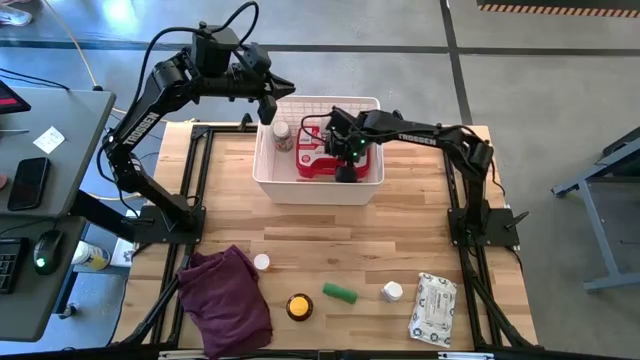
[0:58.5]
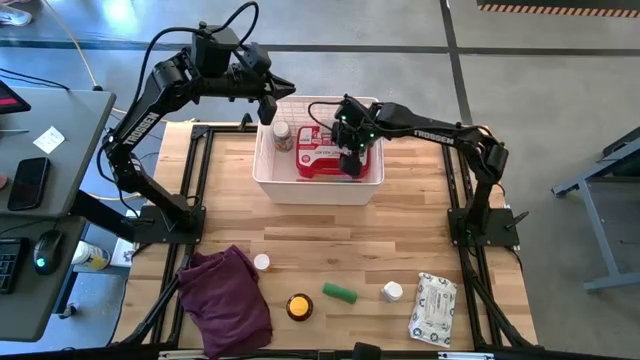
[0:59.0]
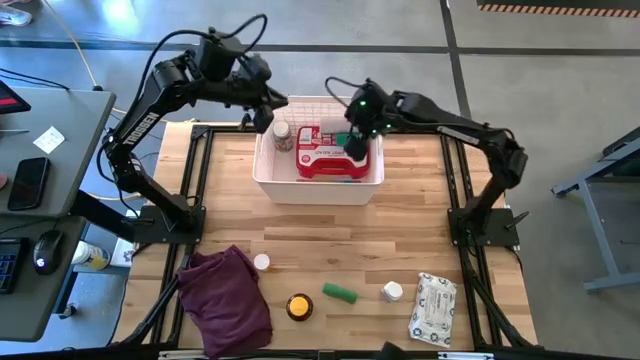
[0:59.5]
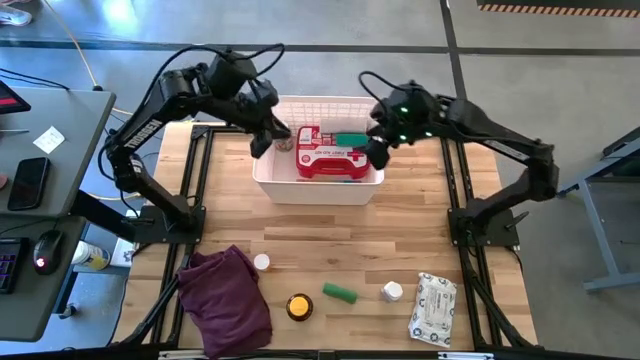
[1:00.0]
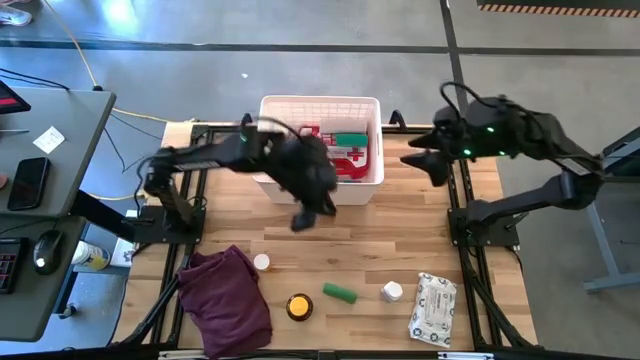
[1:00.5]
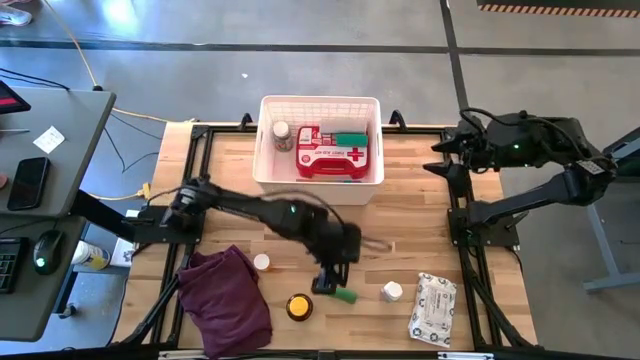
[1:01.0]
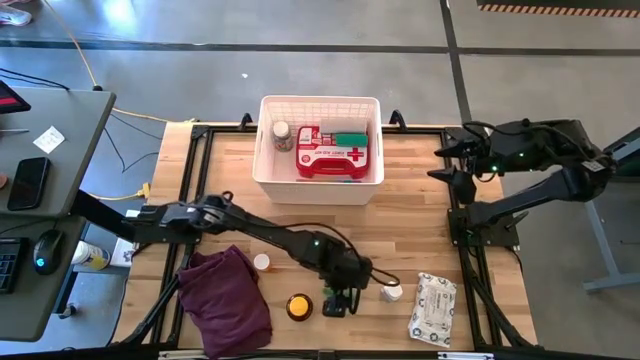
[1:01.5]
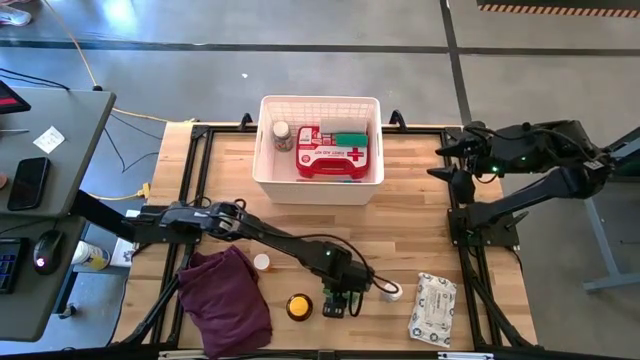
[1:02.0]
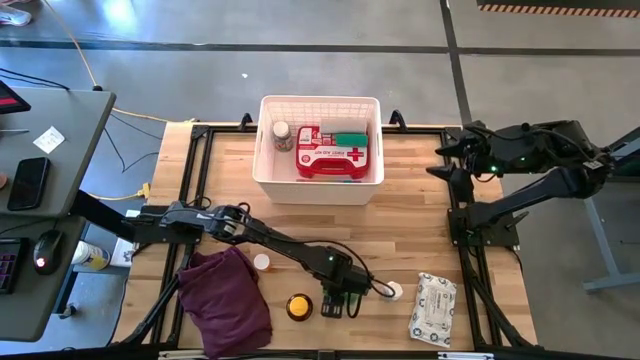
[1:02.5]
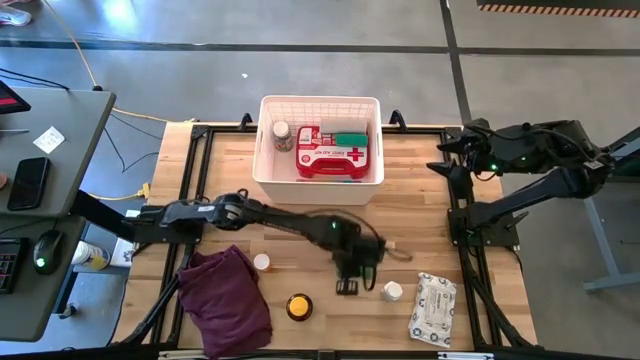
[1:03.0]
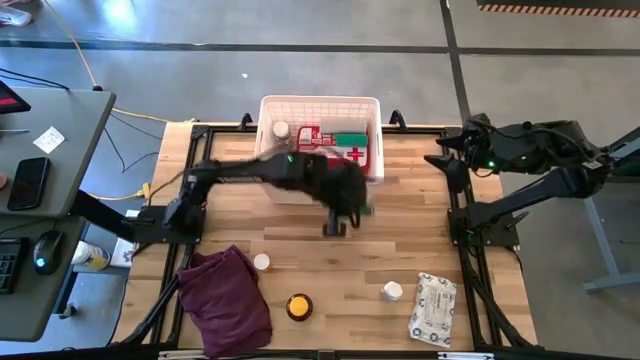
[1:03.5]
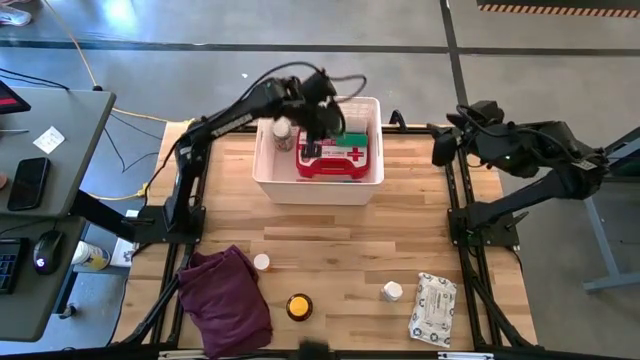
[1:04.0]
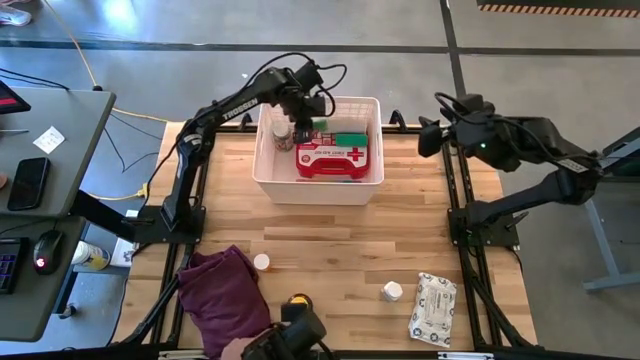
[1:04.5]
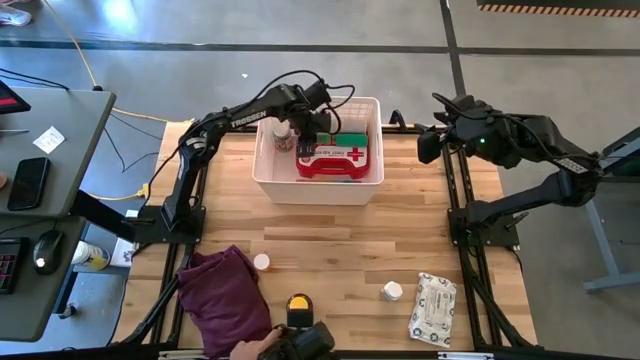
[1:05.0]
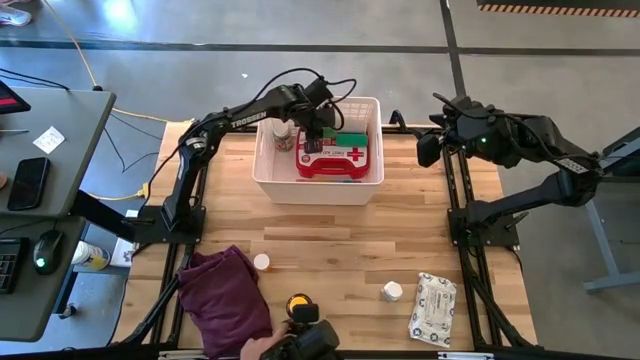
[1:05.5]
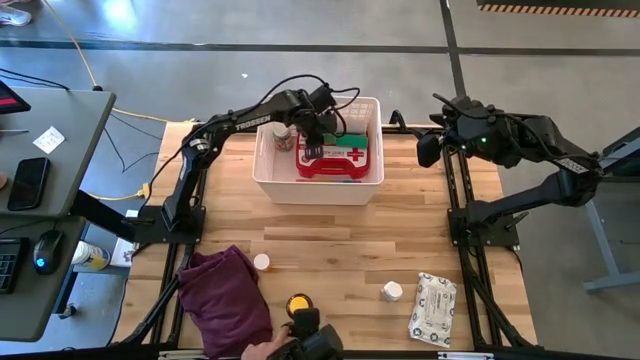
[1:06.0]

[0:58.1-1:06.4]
Task: Pick & place medical supplies in basket/bin
Put the green bandage into the white bin

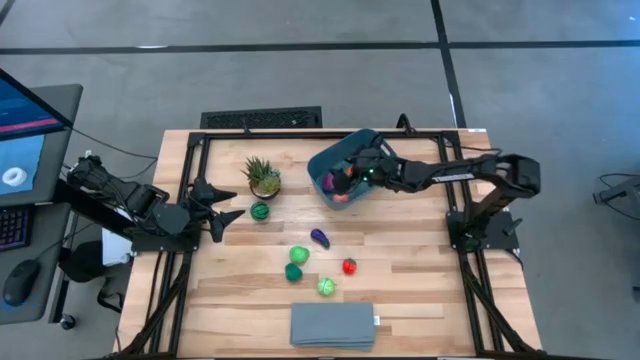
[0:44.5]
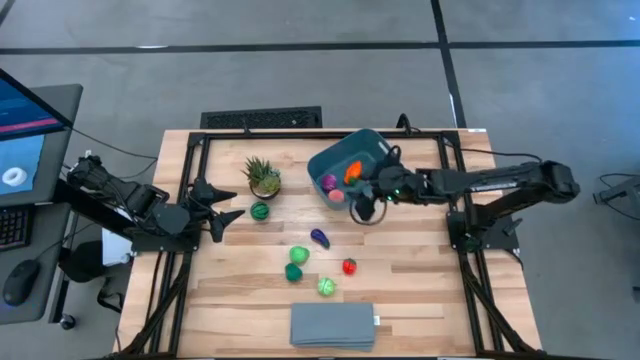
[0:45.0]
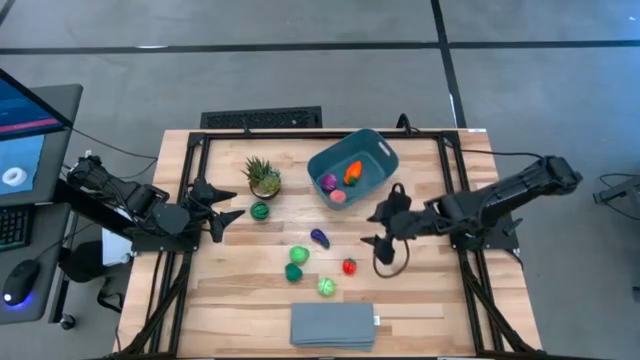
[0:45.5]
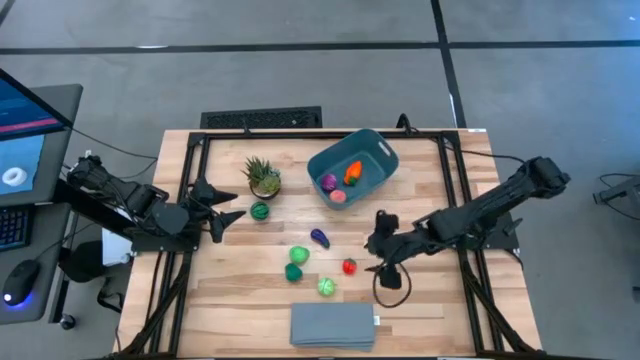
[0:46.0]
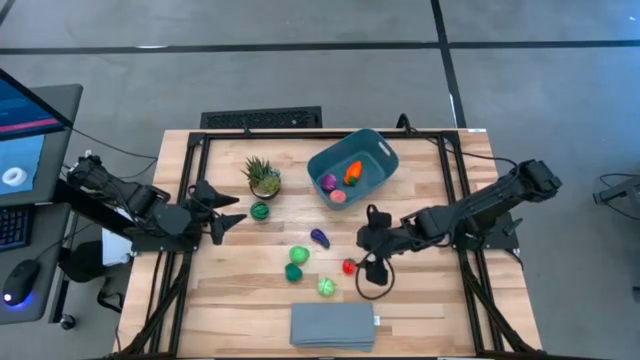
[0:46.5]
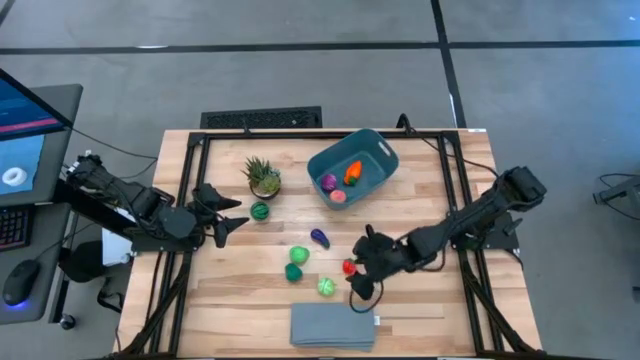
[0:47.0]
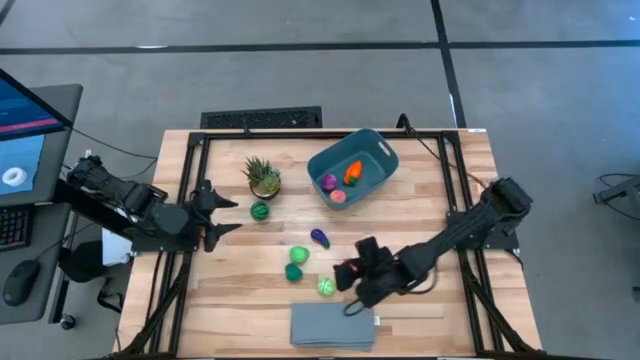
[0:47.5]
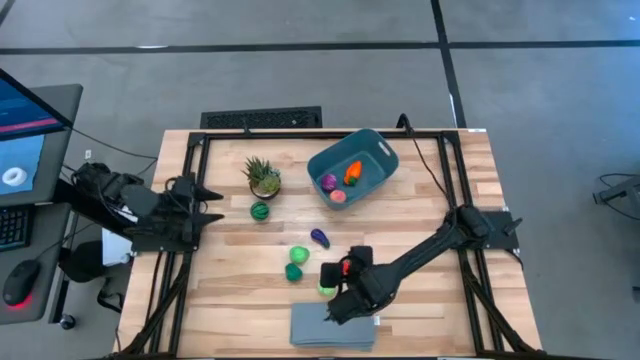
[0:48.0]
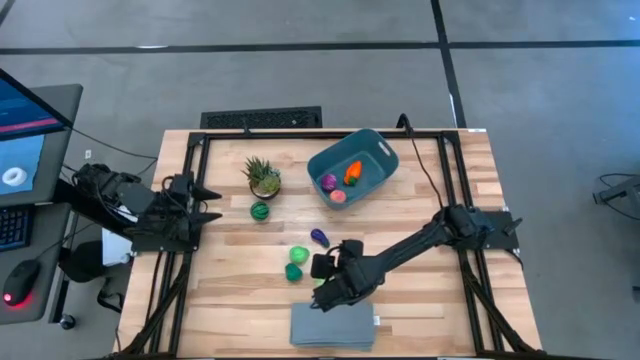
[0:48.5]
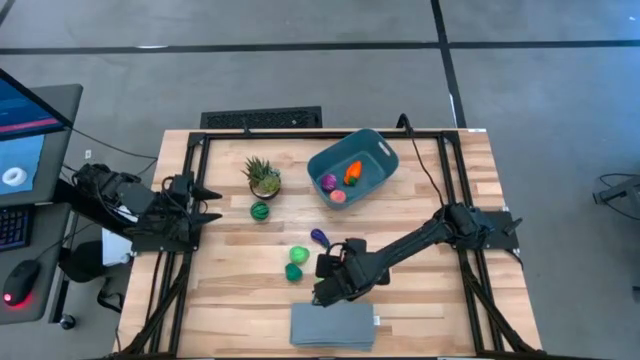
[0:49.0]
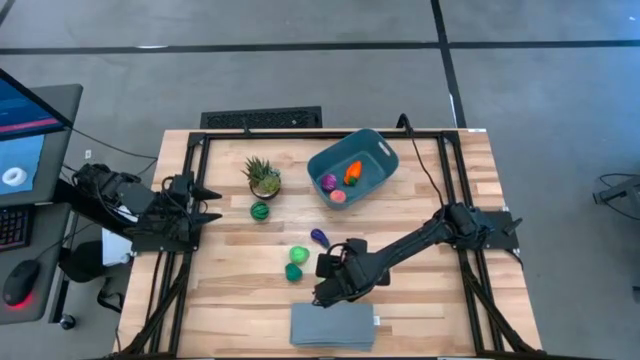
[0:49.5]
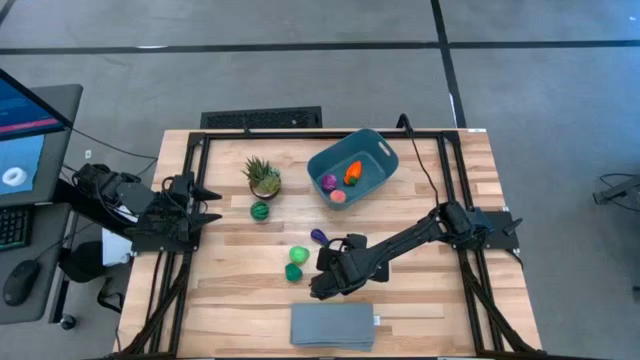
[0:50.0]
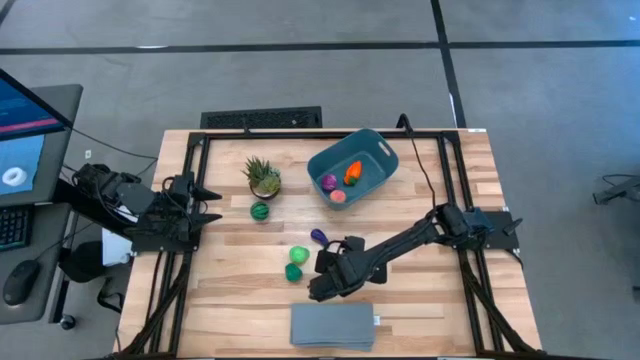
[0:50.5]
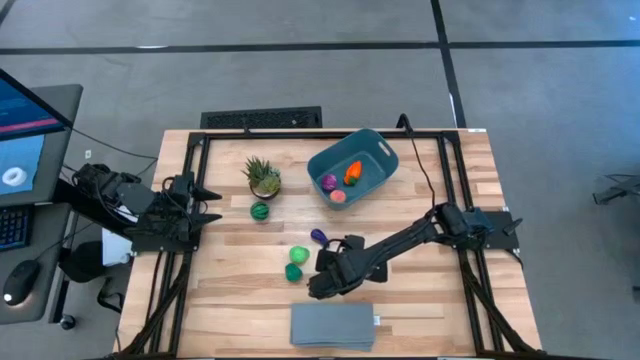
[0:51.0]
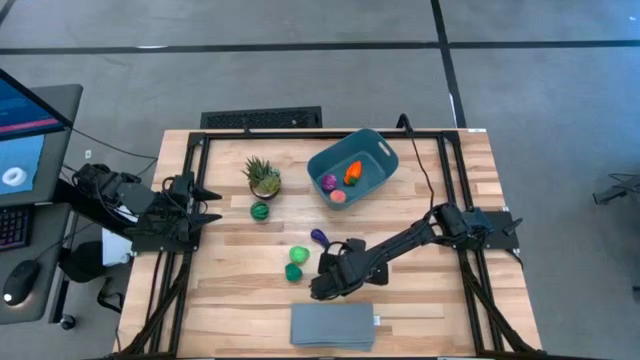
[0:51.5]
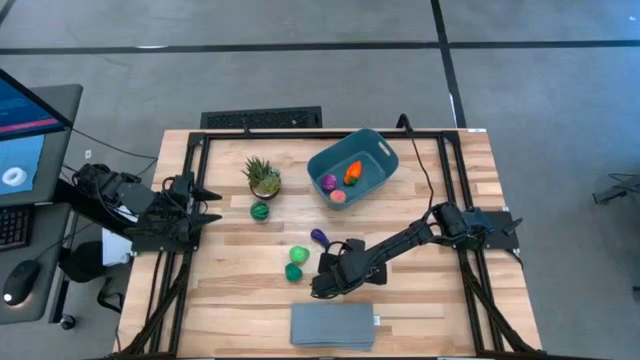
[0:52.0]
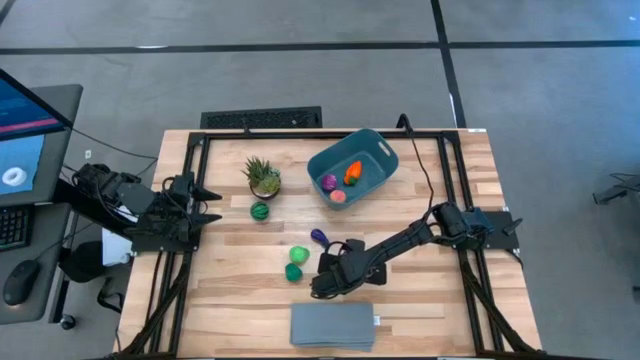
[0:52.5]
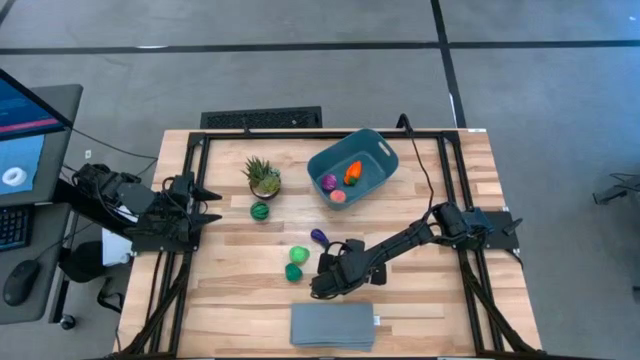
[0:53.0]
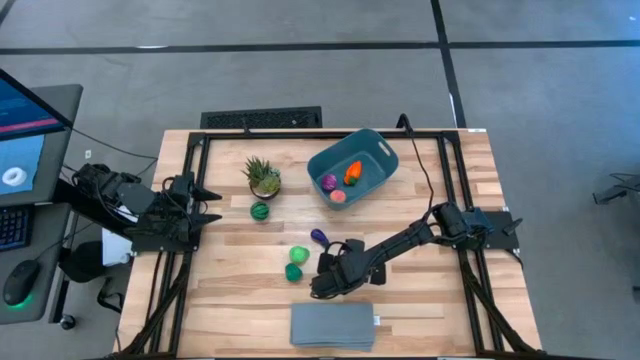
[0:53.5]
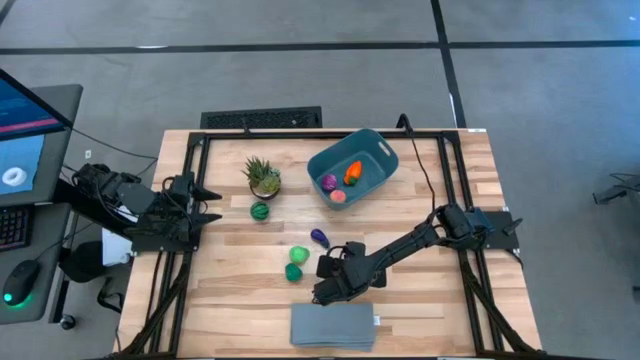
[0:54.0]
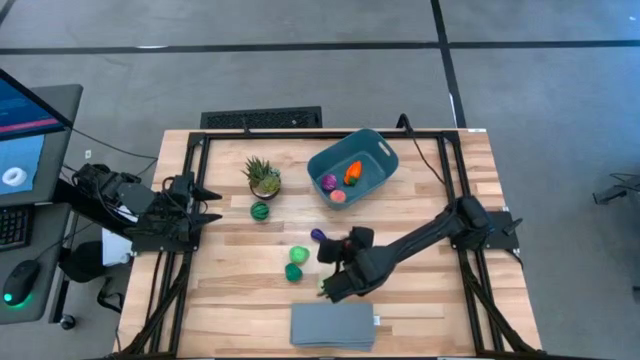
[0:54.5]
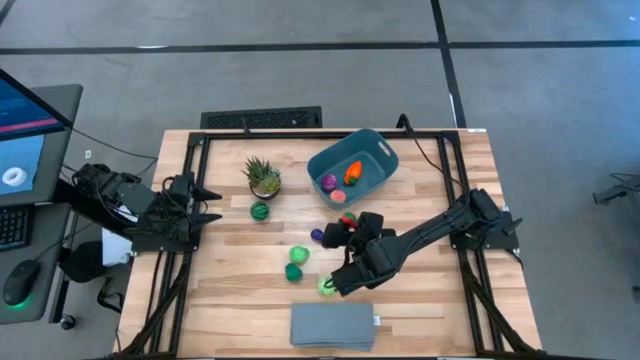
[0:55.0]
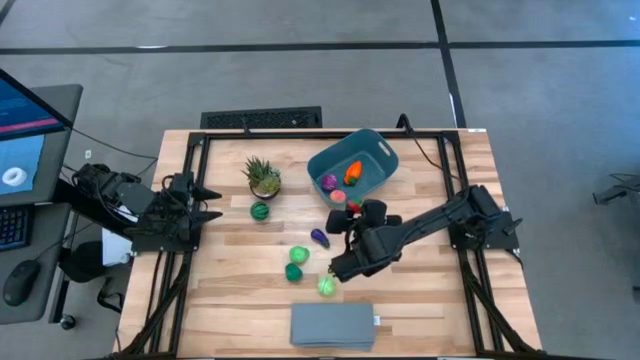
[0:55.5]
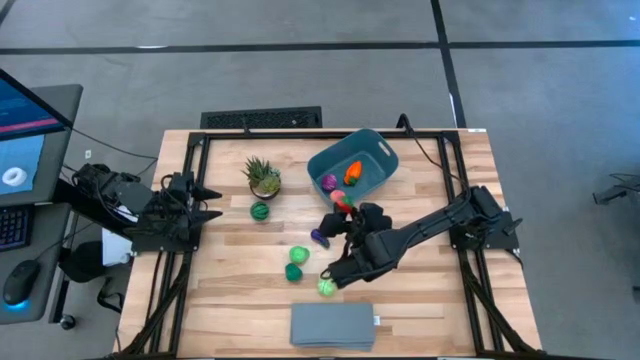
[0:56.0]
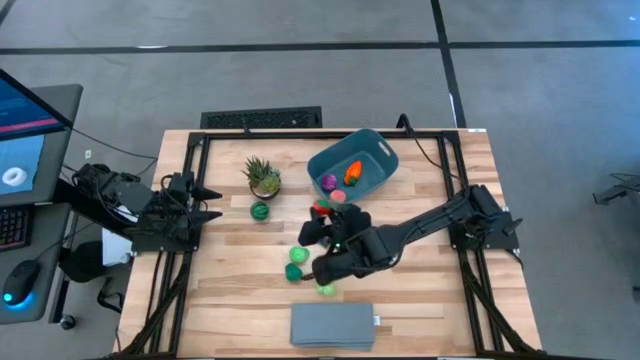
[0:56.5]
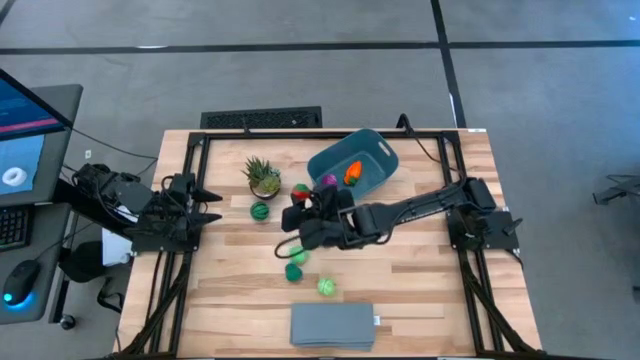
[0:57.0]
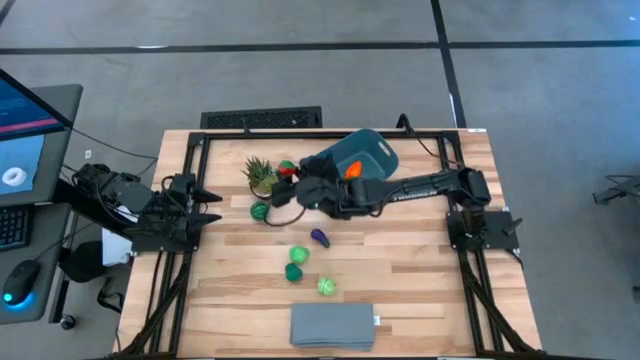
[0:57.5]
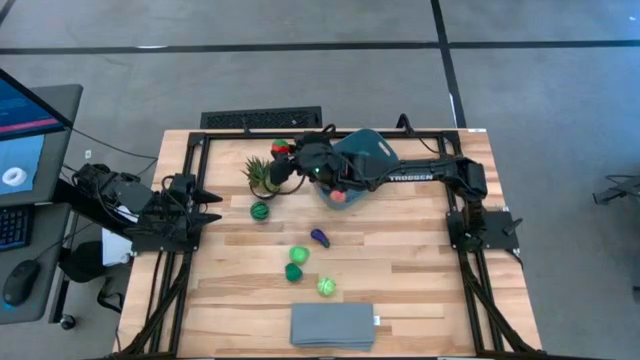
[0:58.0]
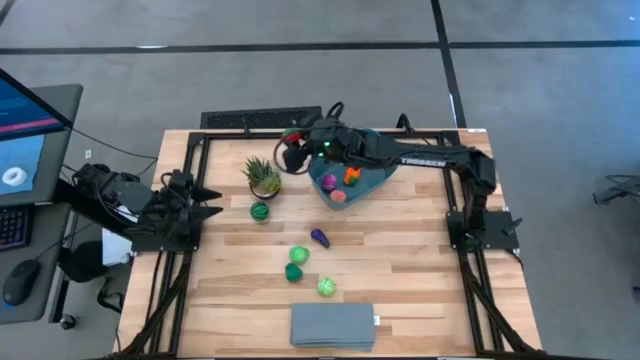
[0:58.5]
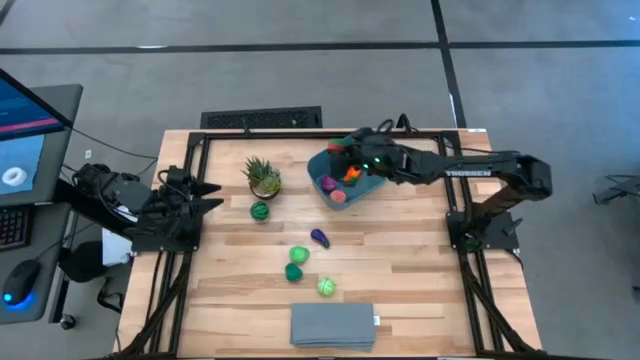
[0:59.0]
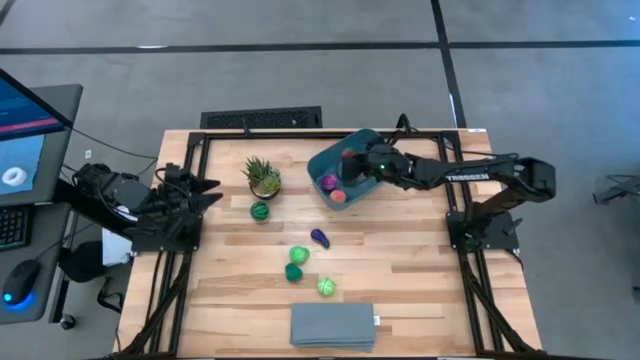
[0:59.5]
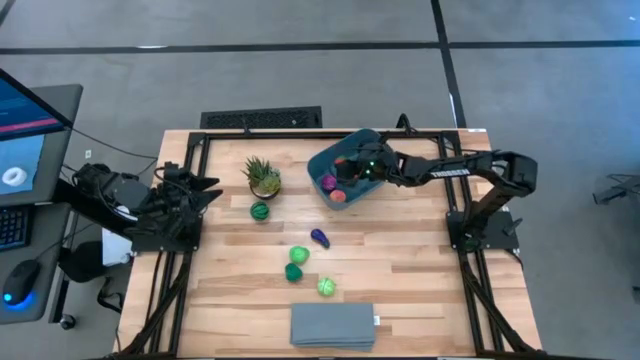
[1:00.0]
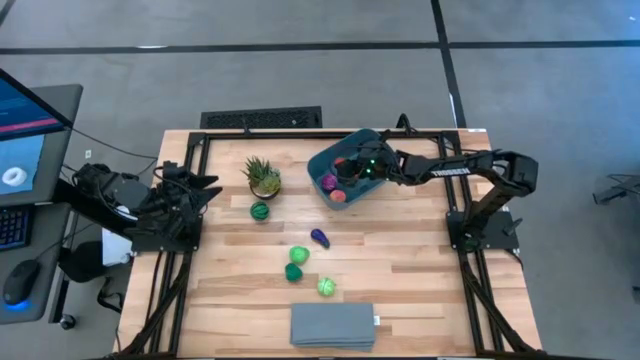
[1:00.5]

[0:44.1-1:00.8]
Task: Pick and placing Produce into tupperware
Put the strawberry into the bin
